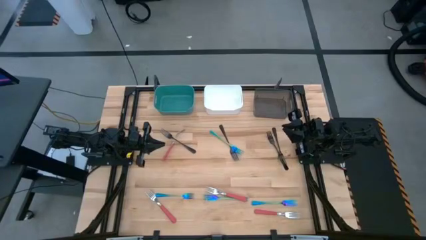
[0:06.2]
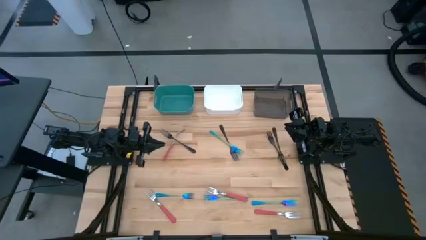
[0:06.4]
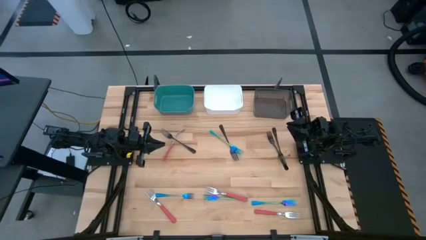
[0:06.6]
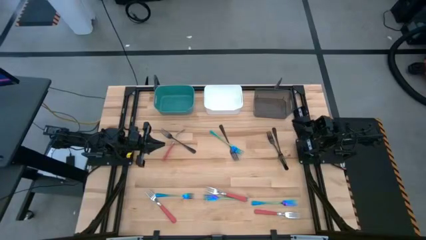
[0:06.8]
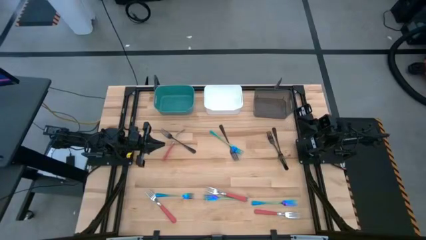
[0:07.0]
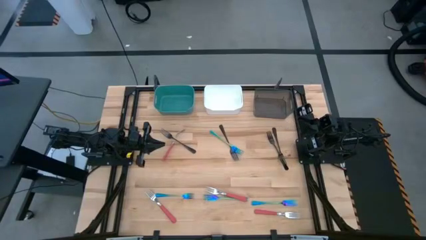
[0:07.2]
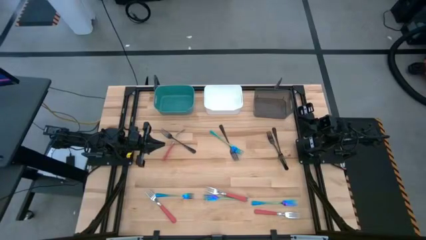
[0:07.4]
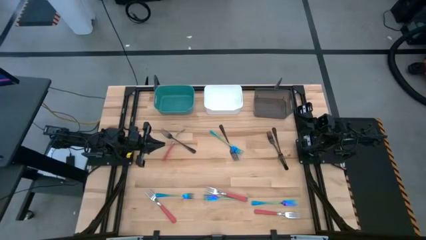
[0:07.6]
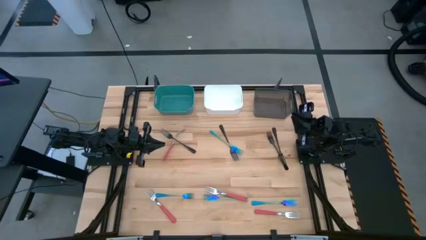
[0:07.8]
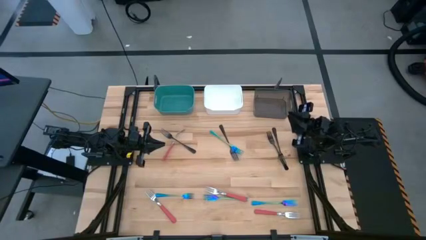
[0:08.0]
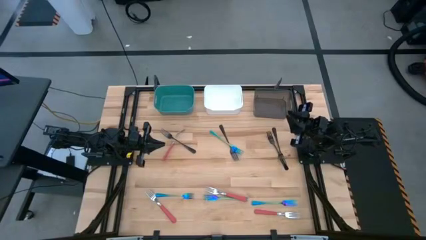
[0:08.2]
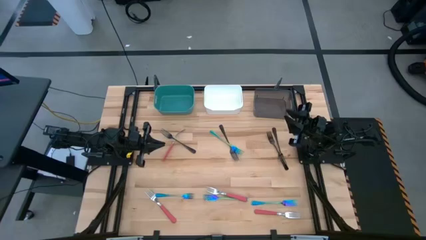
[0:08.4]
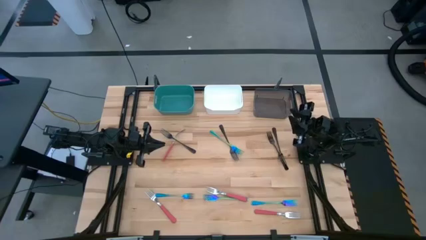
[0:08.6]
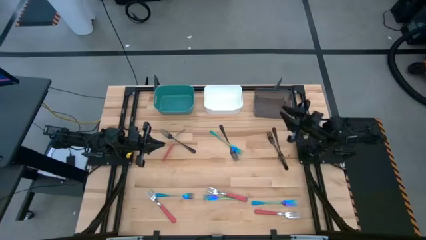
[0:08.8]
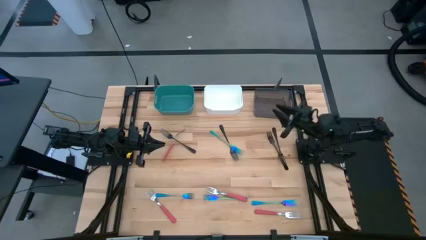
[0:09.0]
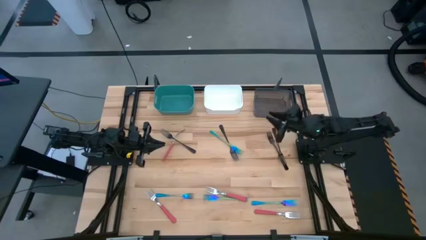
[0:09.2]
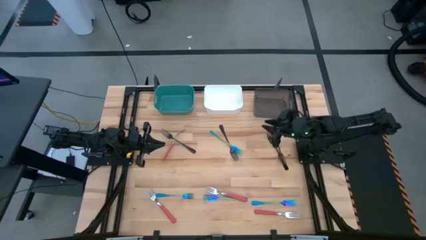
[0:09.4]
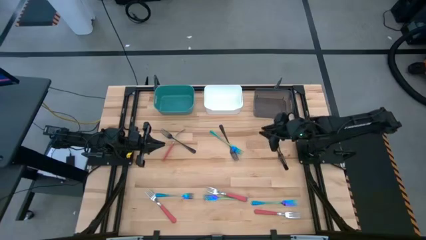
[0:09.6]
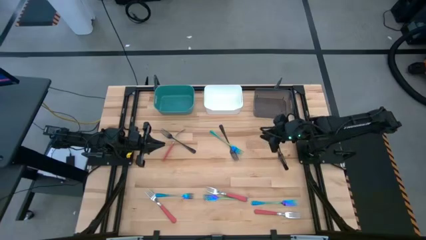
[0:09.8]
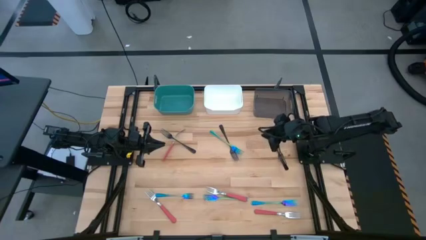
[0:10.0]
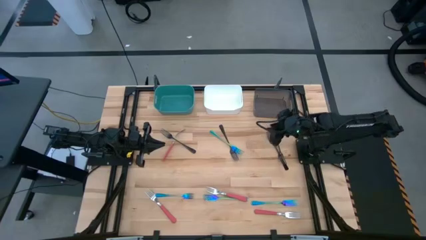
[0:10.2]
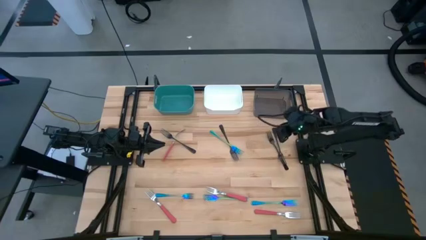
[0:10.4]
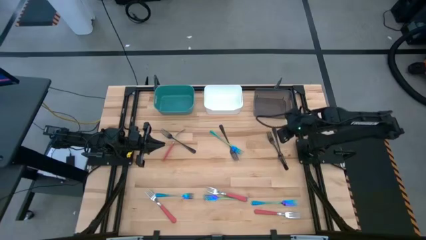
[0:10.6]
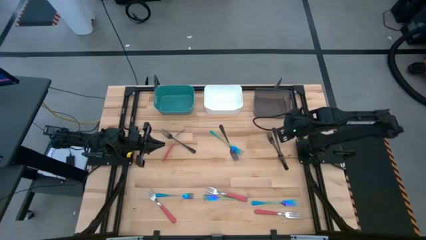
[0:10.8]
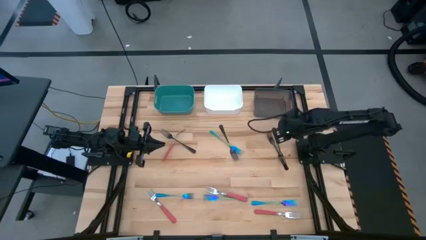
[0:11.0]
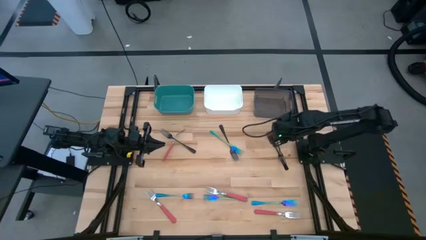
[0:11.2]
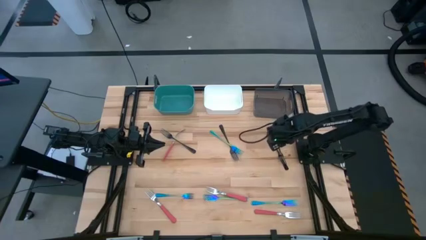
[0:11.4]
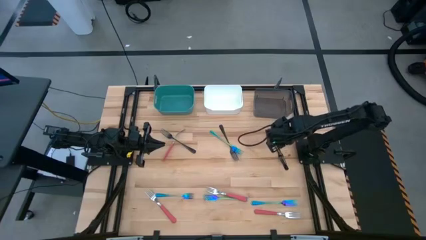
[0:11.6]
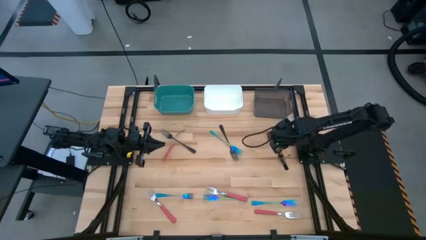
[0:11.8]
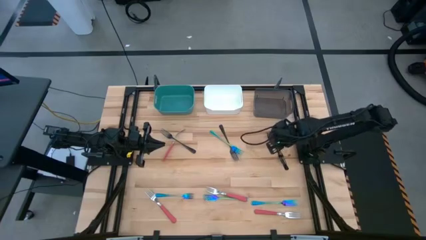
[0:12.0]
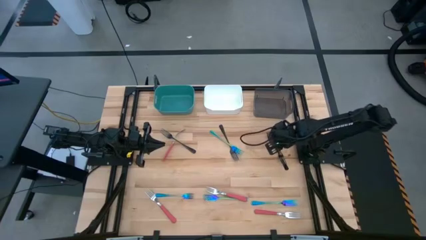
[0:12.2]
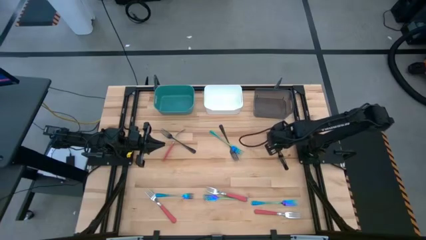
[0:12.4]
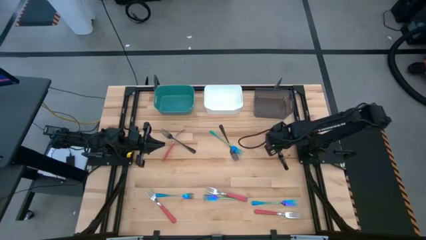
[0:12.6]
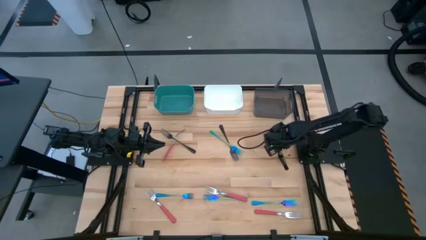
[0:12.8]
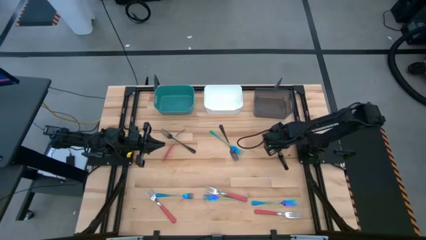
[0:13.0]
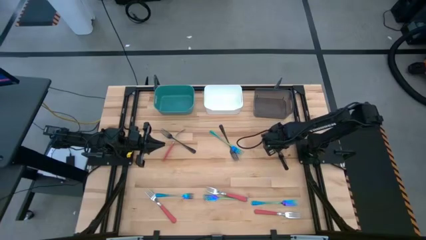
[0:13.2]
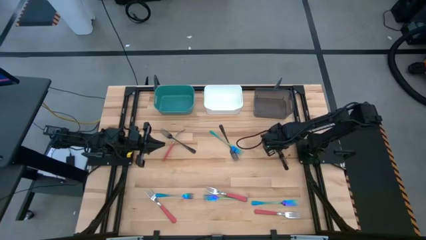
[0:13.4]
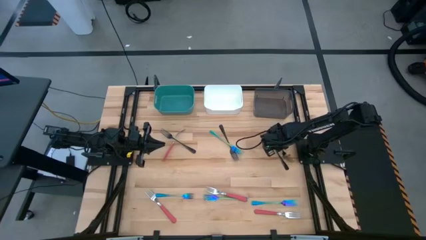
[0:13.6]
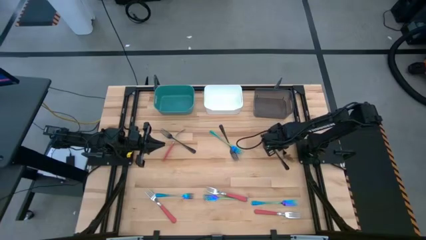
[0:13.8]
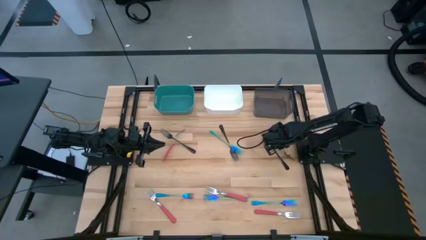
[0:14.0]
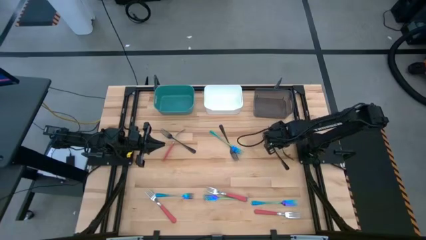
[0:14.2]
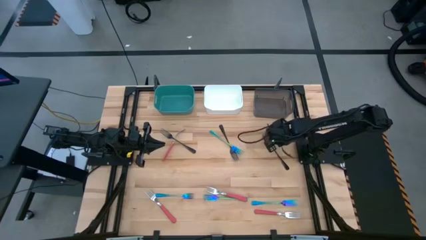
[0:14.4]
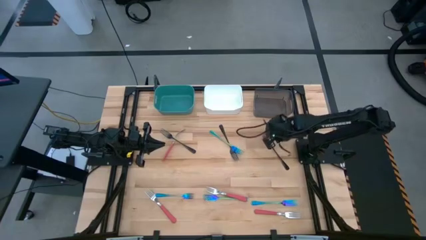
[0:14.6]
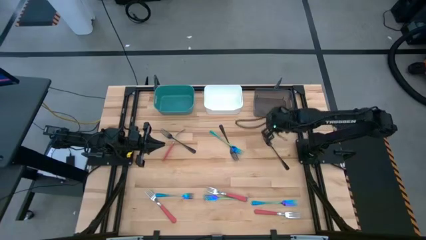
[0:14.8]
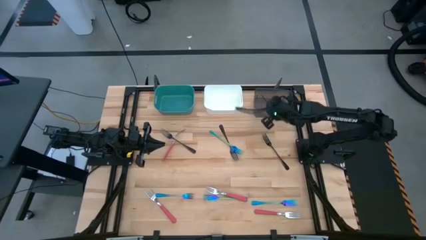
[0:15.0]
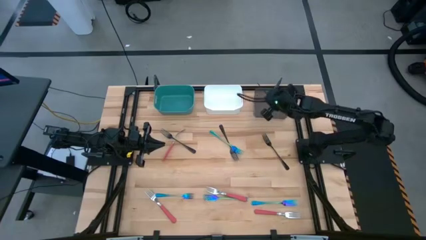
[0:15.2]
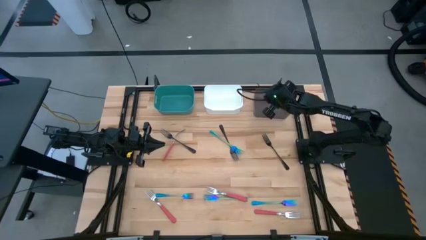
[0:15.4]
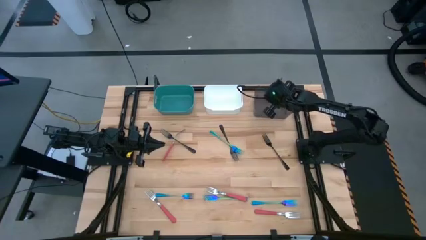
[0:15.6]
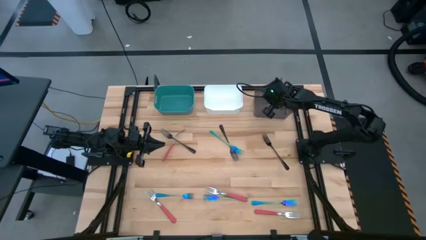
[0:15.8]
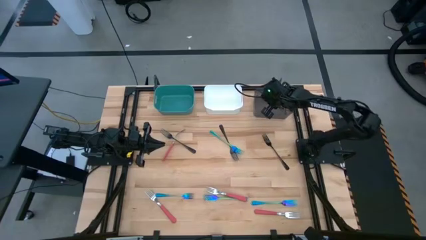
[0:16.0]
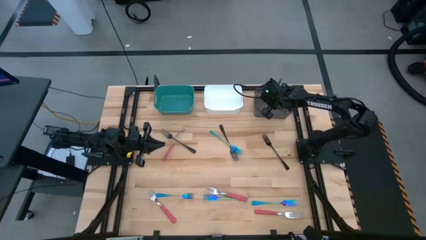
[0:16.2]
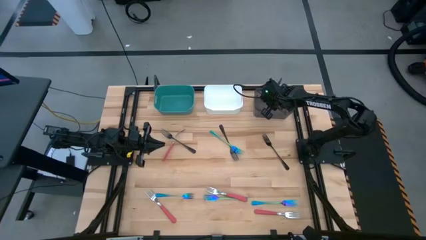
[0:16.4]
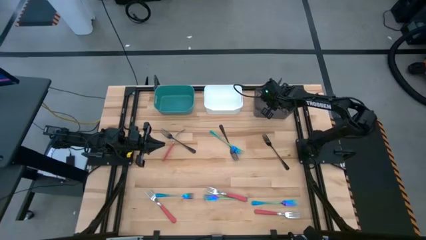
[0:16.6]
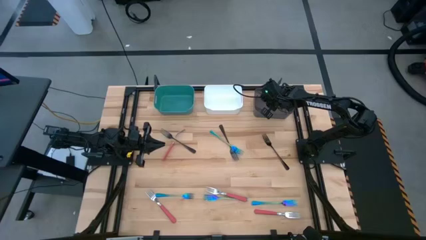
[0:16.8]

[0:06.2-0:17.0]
Task: Sort silverware by color (type)
Put the black fork into the black bin
